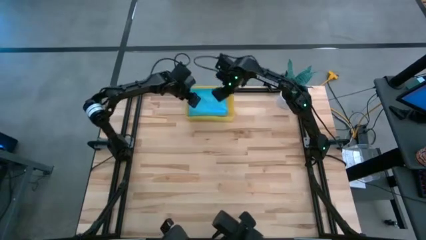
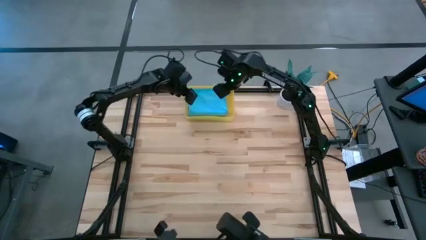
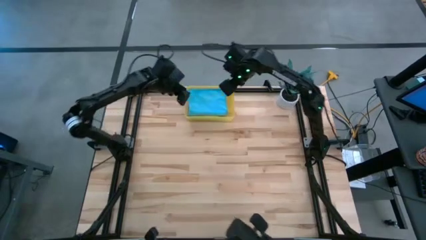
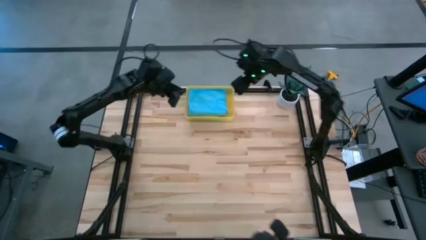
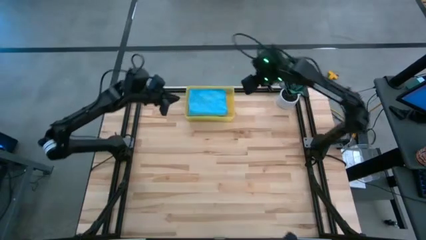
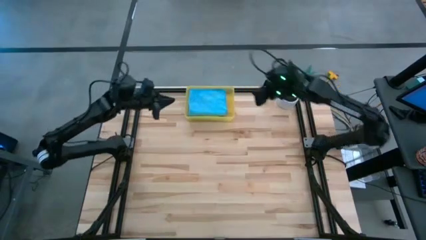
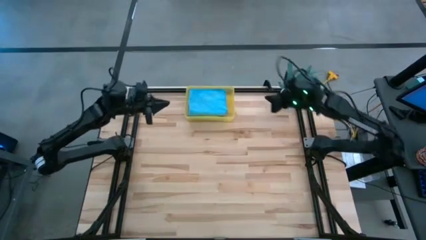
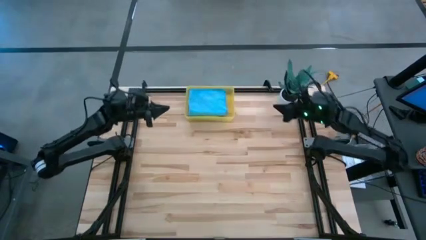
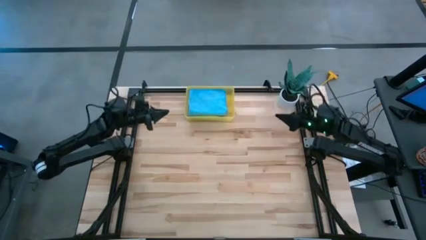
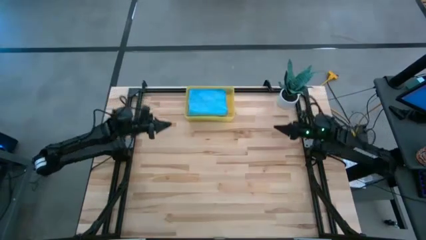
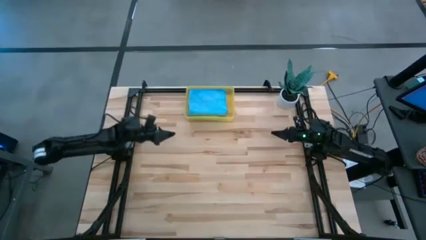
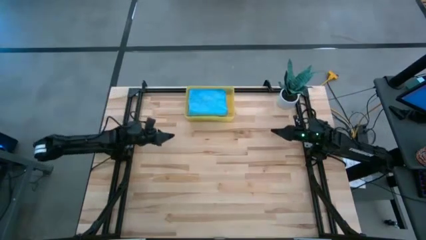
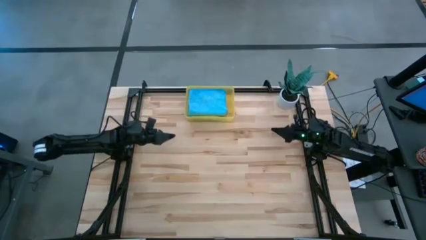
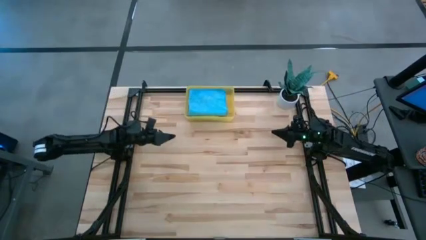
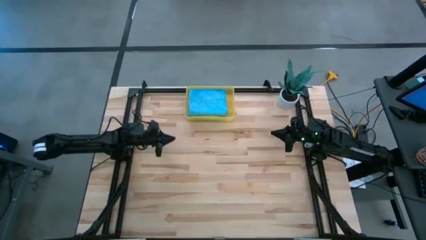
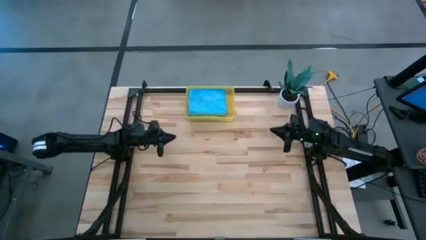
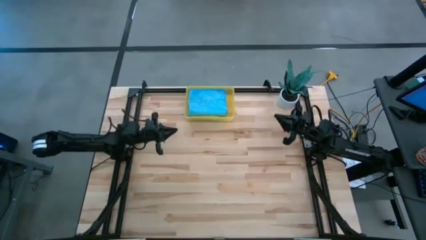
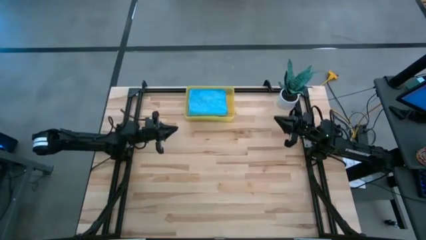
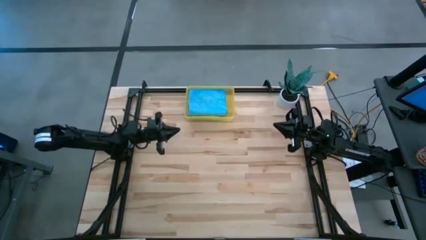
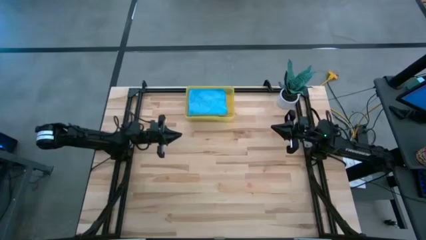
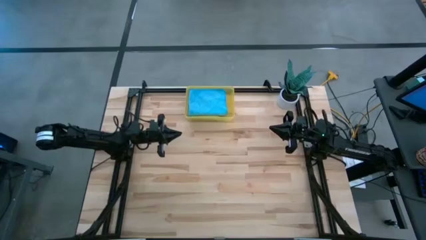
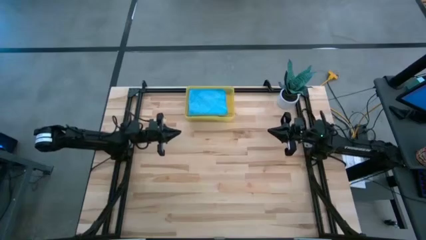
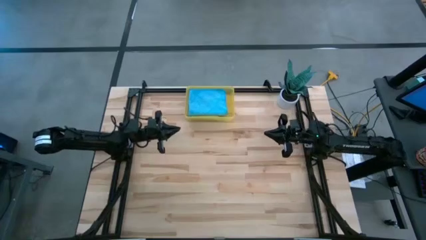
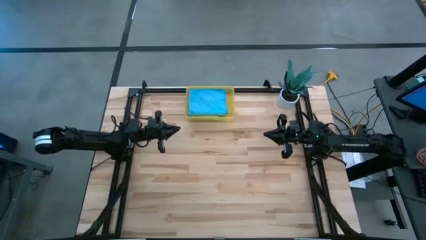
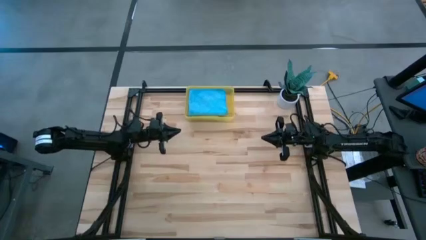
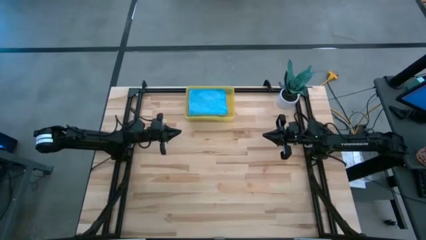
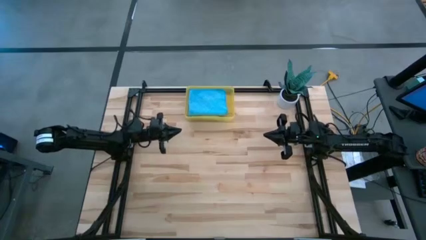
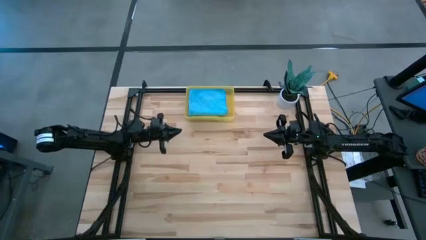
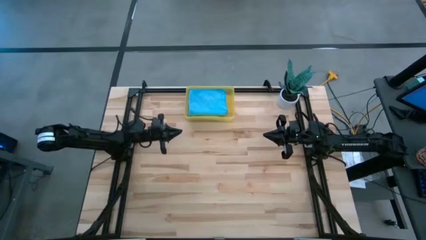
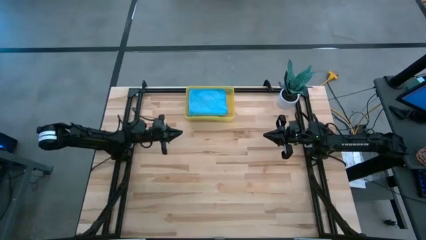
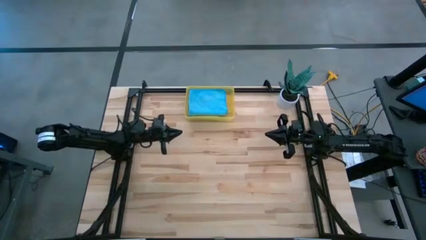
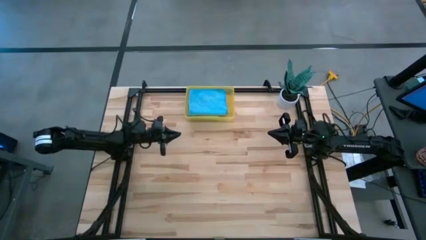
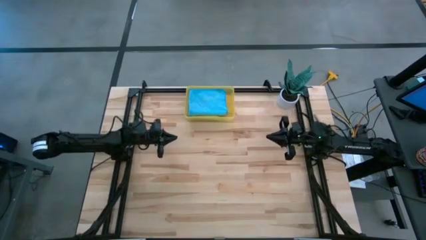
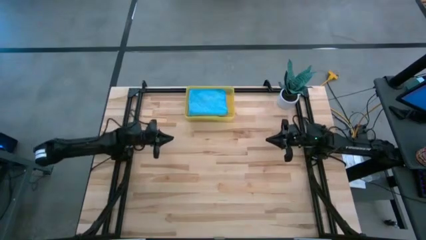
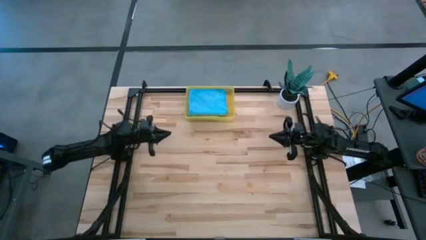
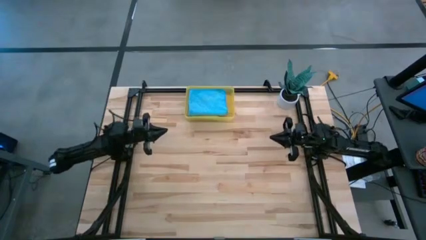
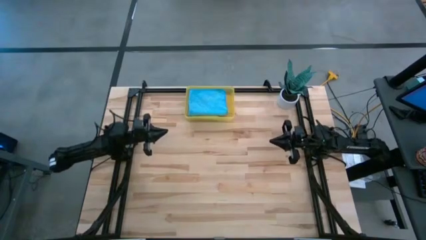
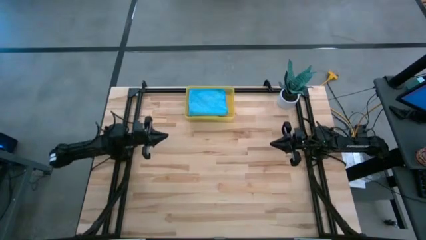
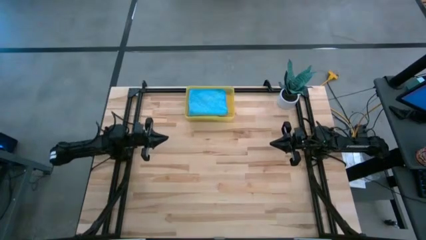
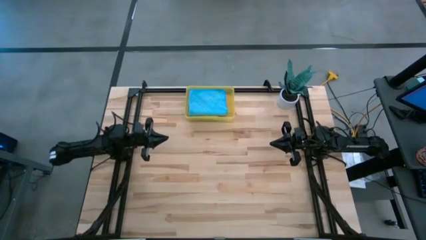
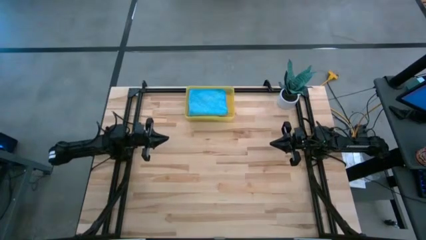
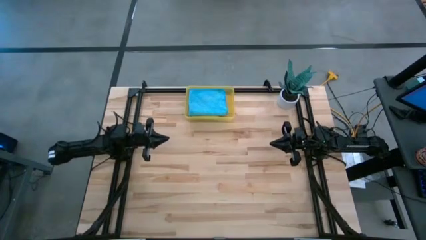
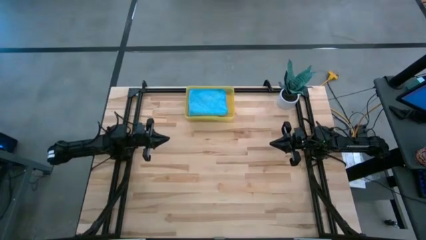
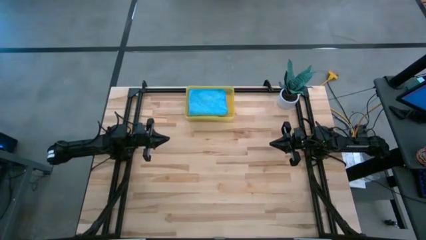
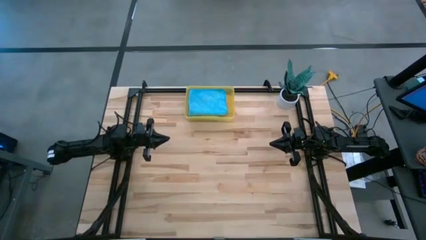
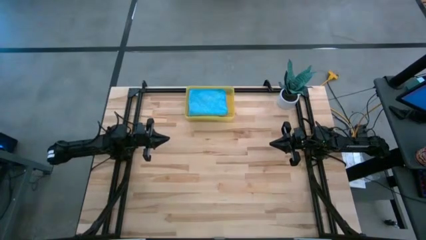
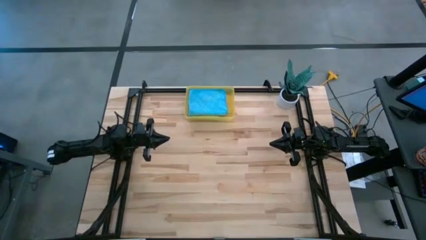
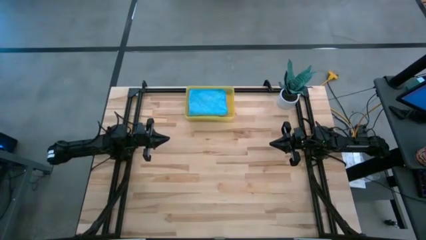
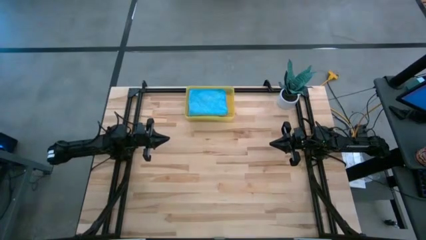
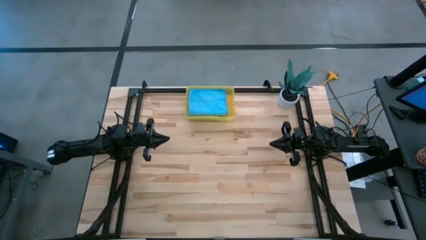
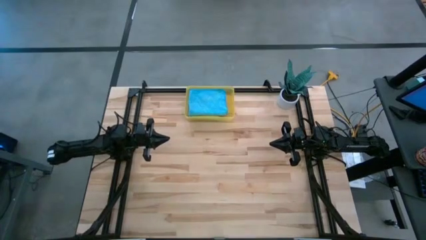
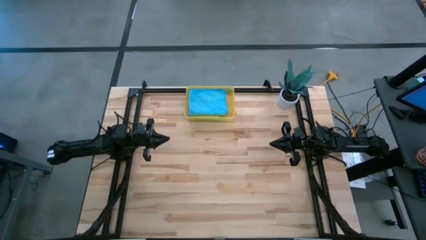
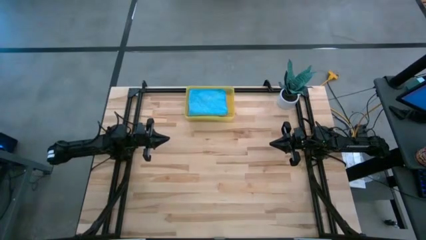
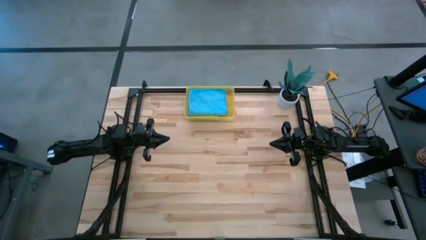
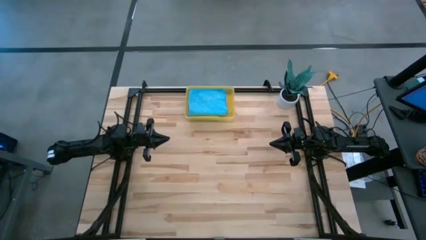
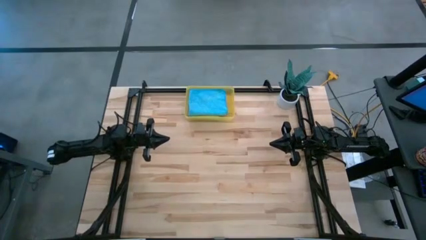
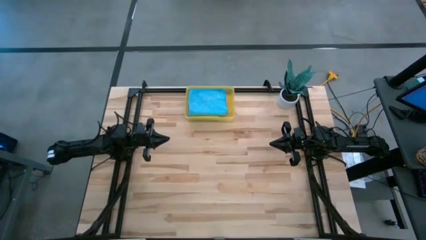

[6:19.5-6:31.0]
Task: Fold microfiber towels
Return to Home Position

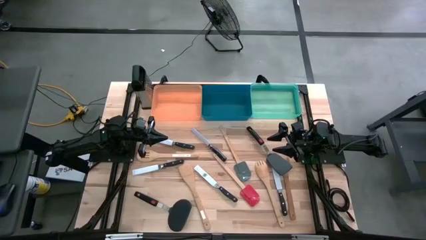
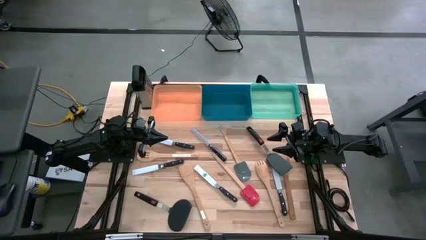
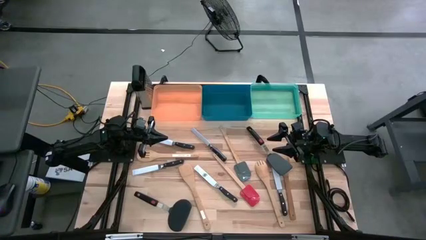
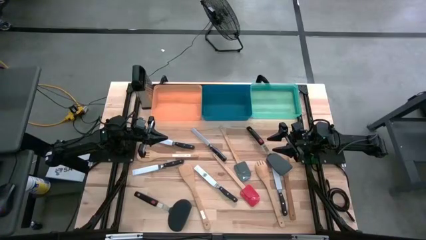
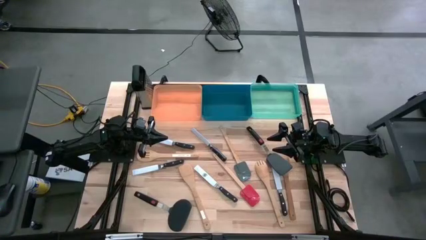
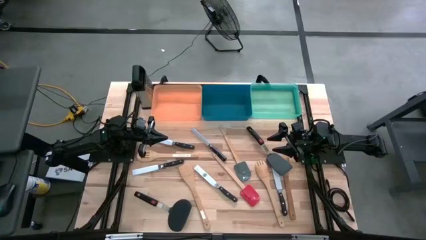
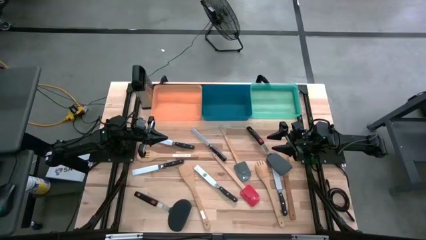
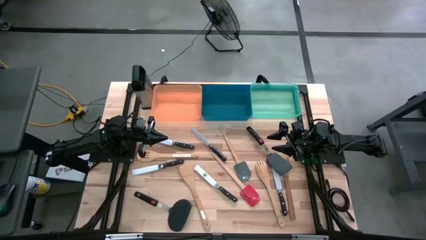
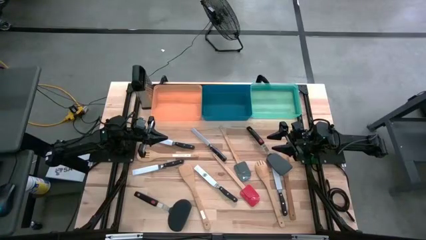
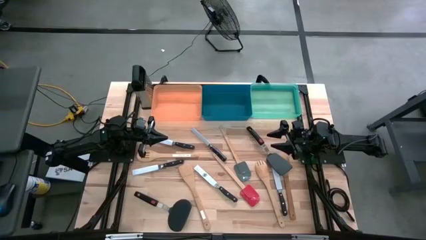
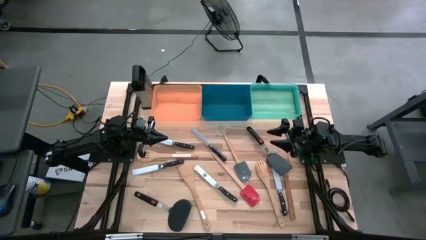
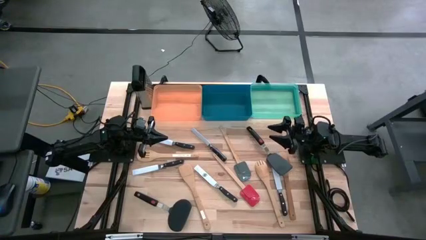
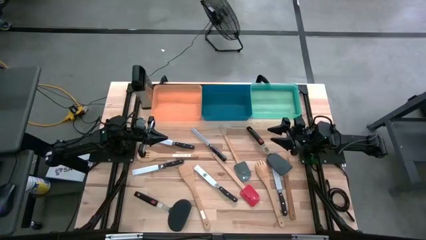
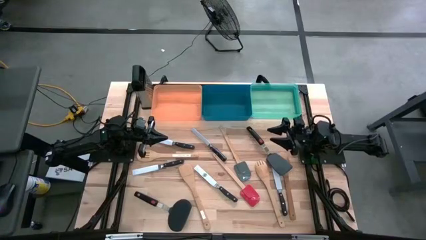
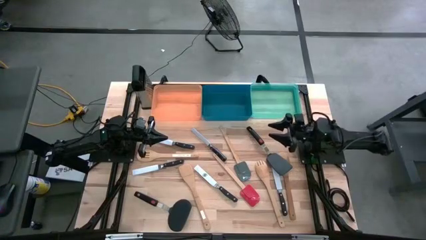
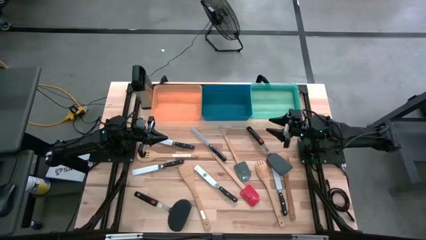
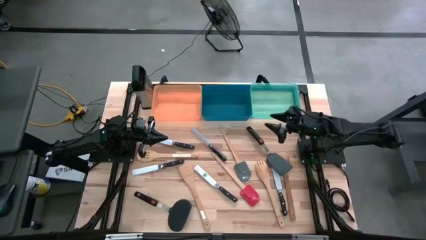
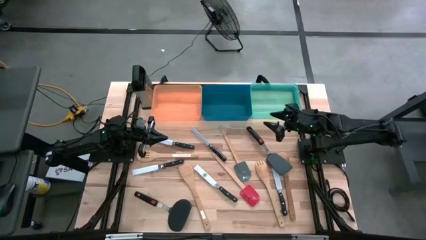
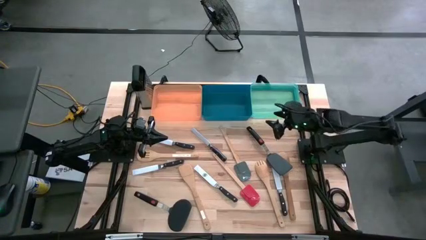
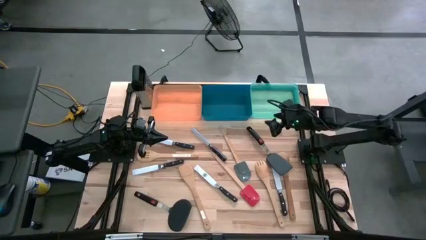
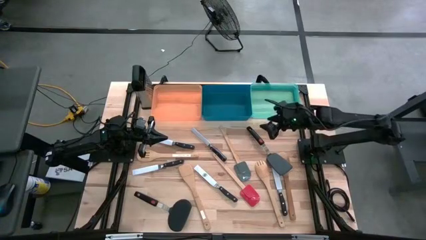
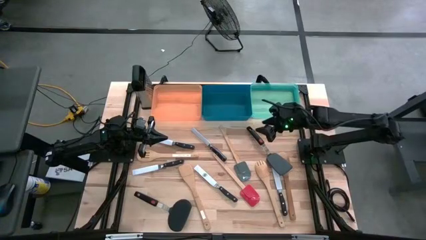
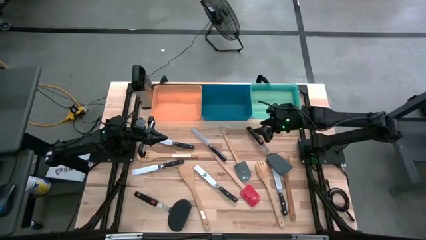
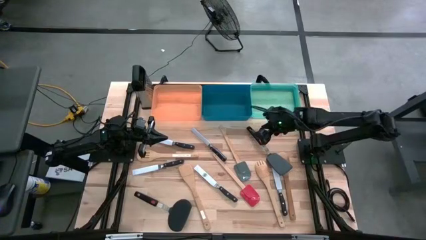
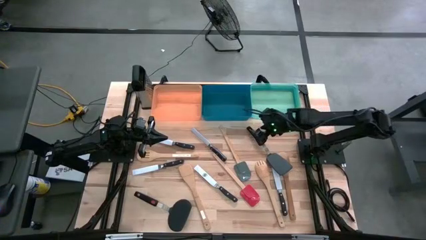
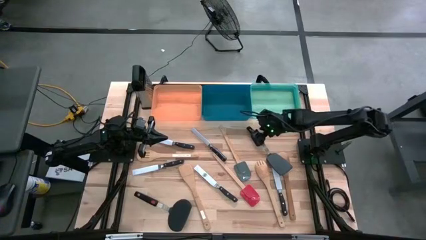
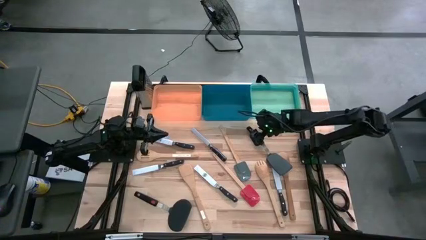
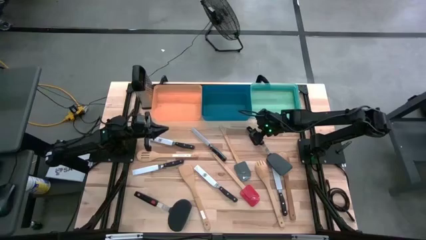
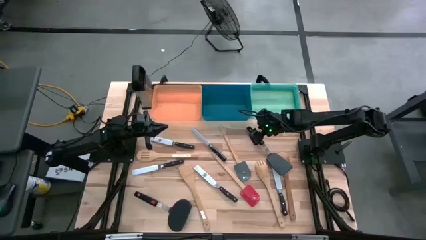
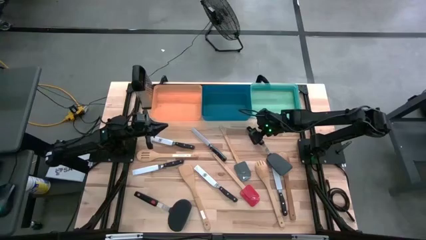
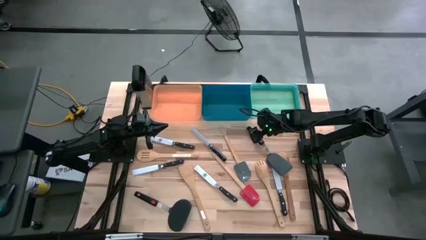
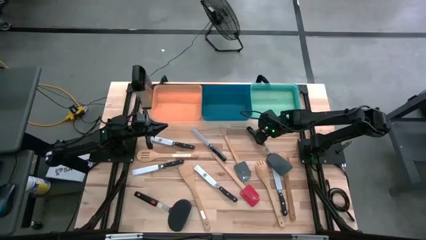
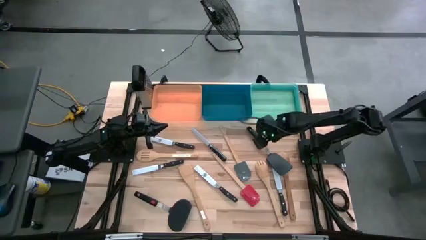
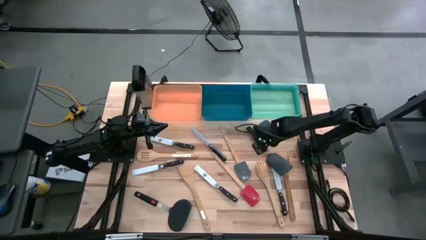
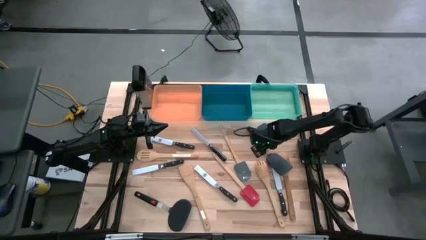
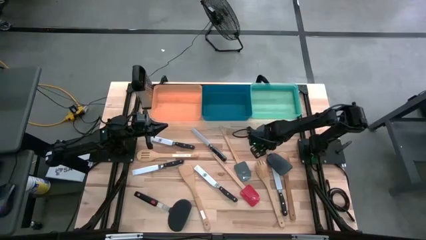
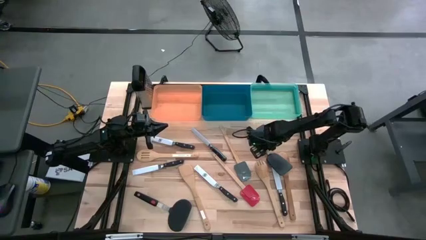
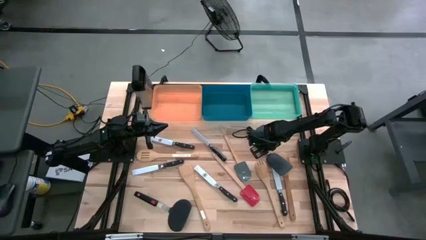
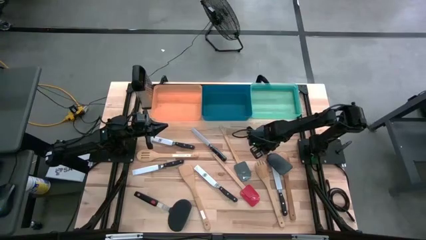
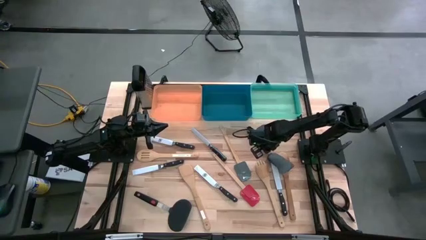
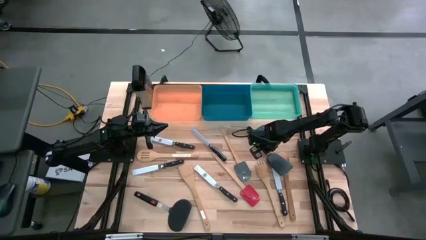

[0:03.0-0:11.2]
Task: Pick & Place Kitchen Items
Put the black spatula into the green bin
